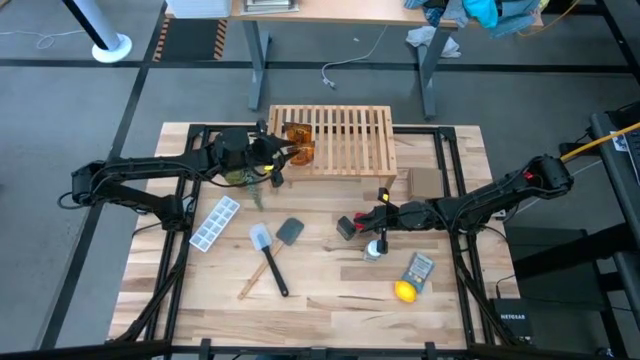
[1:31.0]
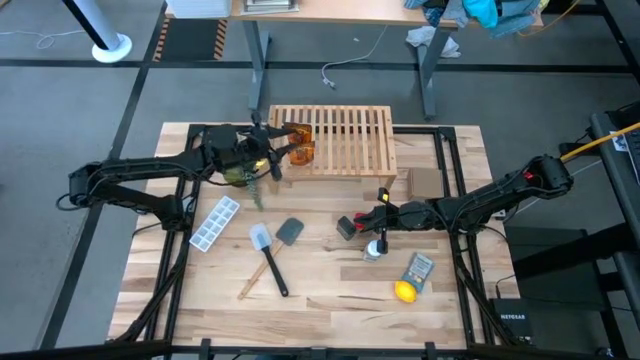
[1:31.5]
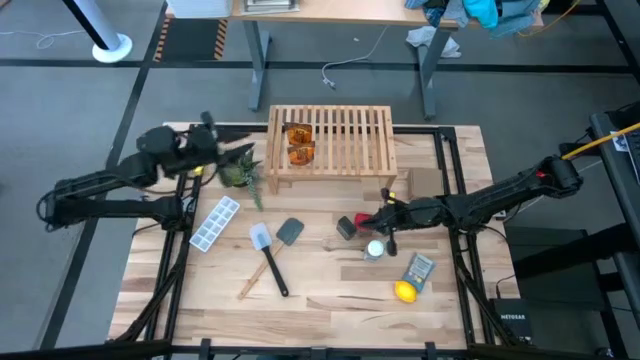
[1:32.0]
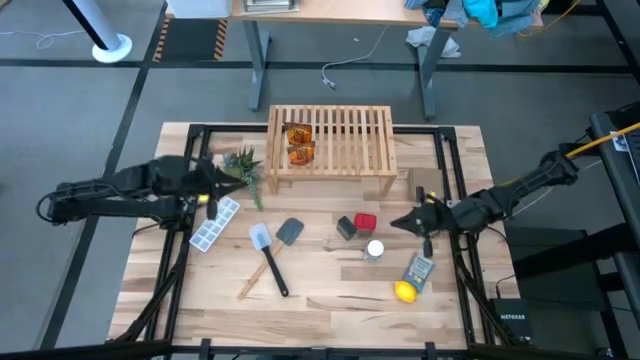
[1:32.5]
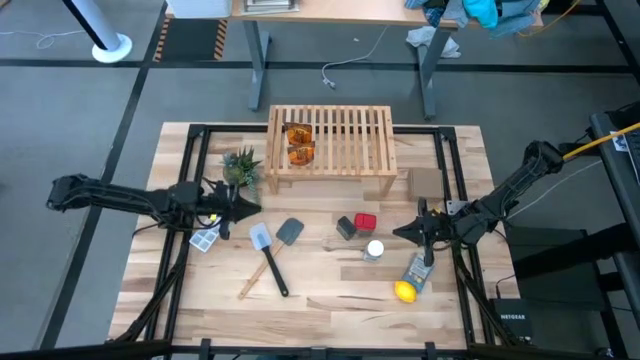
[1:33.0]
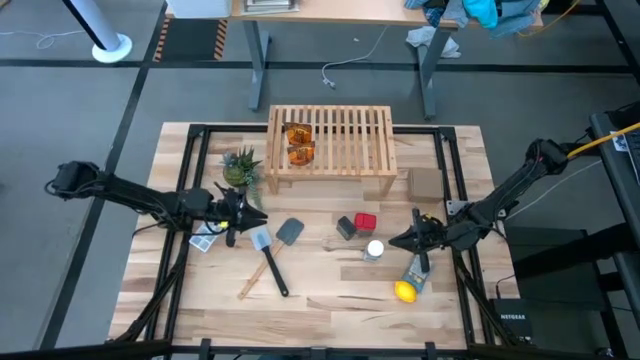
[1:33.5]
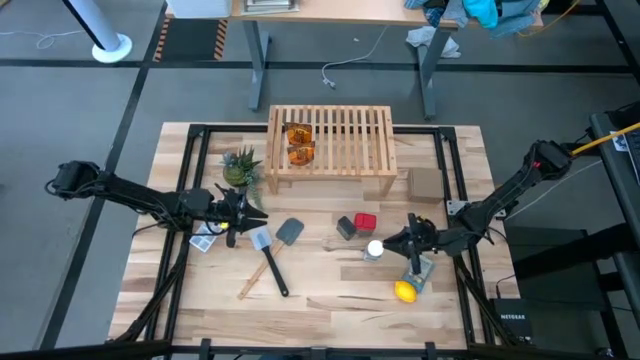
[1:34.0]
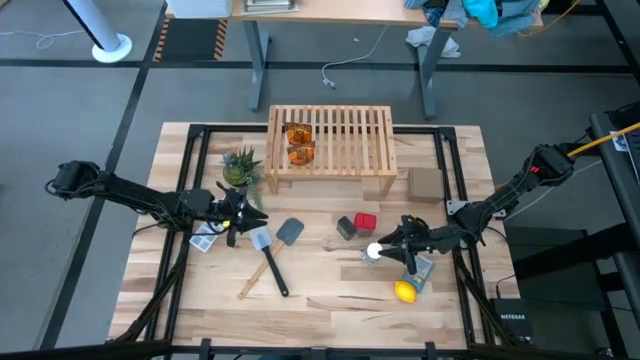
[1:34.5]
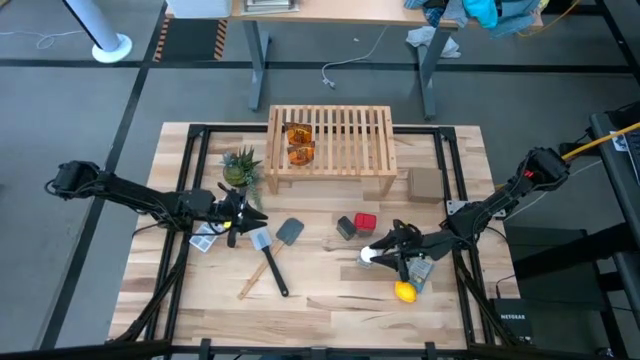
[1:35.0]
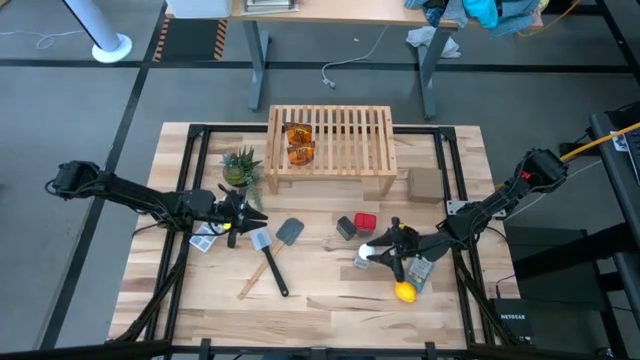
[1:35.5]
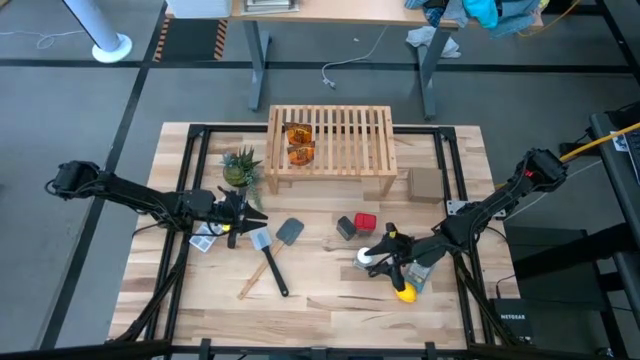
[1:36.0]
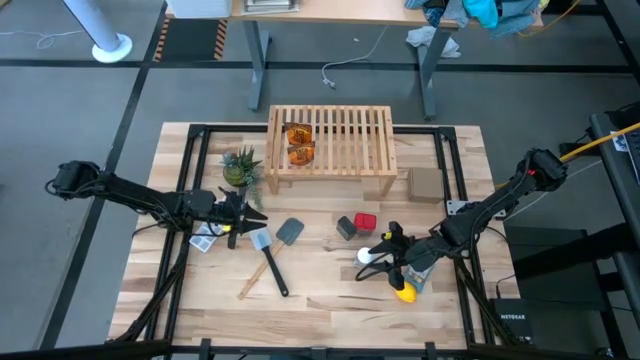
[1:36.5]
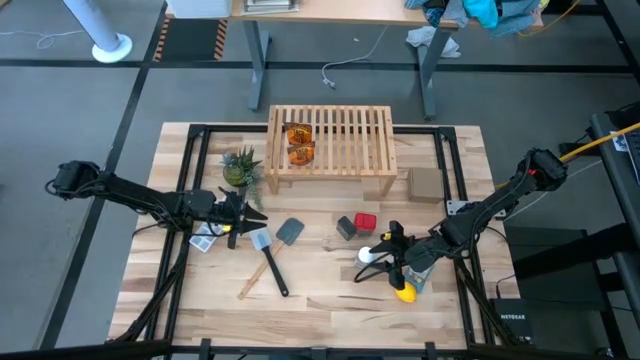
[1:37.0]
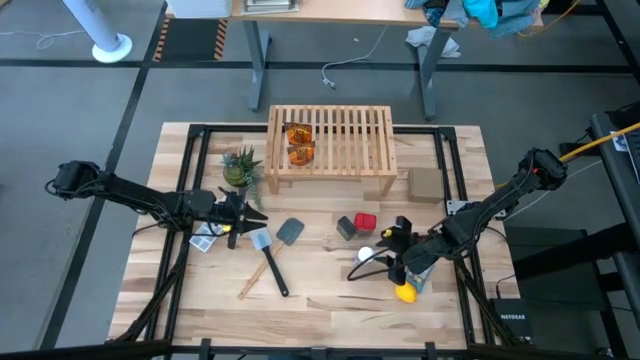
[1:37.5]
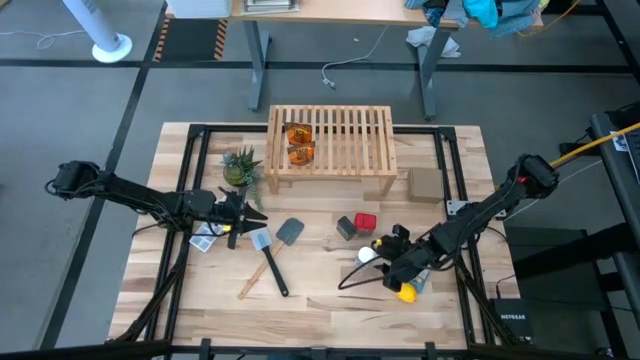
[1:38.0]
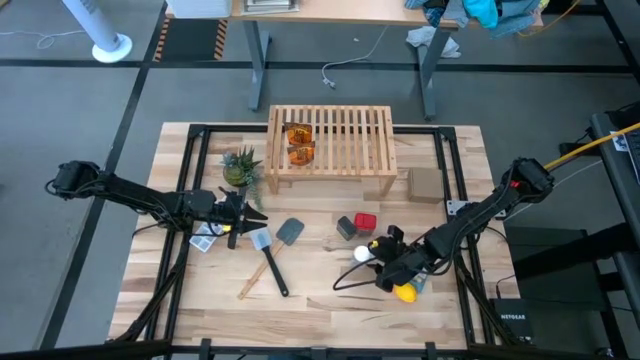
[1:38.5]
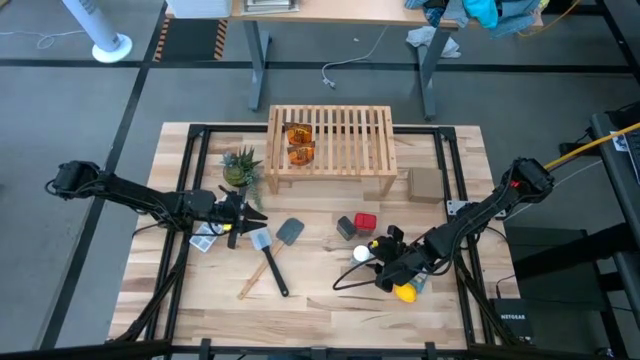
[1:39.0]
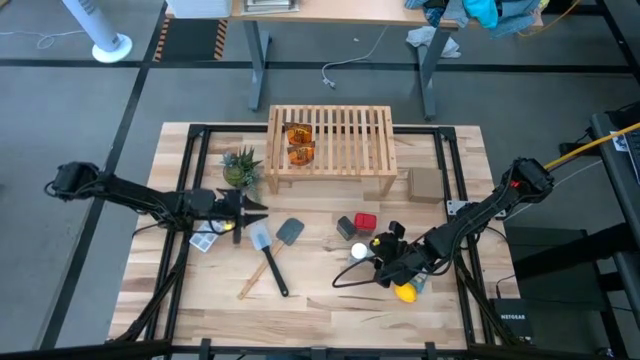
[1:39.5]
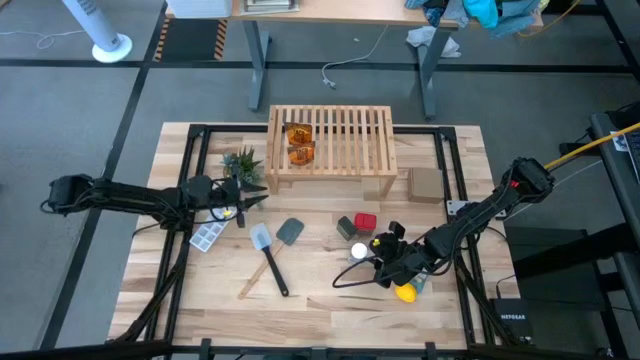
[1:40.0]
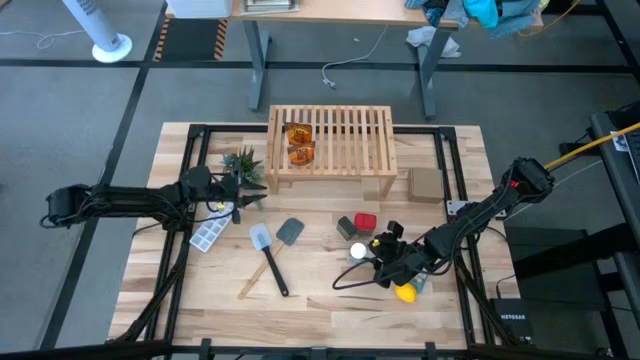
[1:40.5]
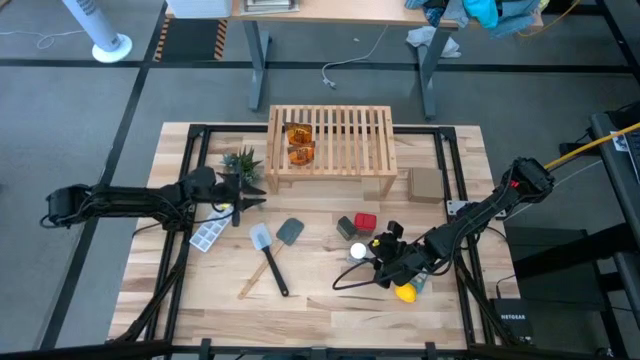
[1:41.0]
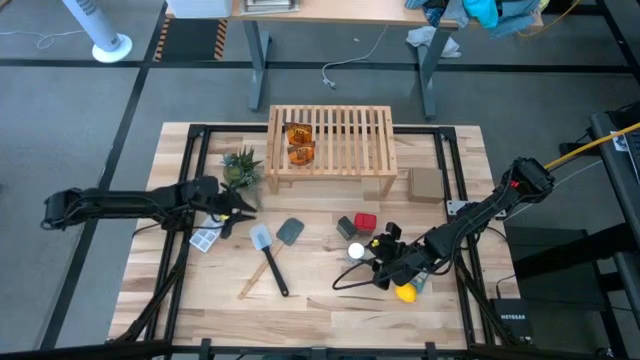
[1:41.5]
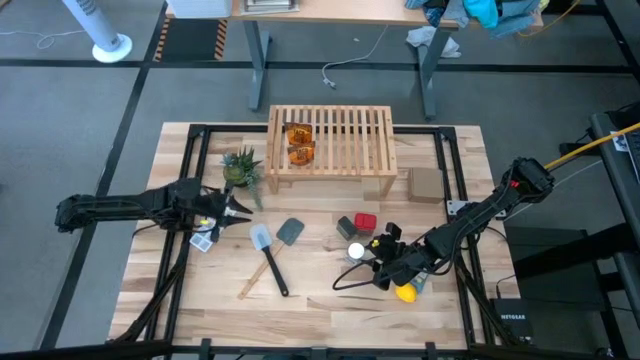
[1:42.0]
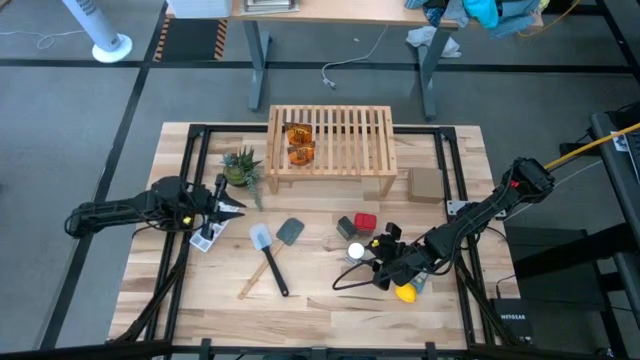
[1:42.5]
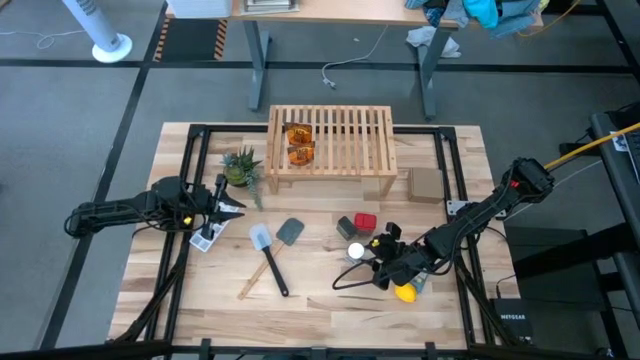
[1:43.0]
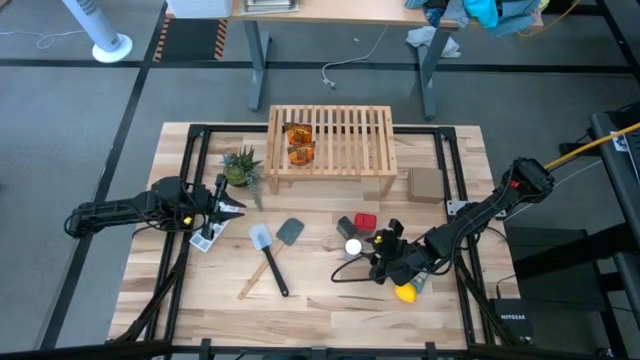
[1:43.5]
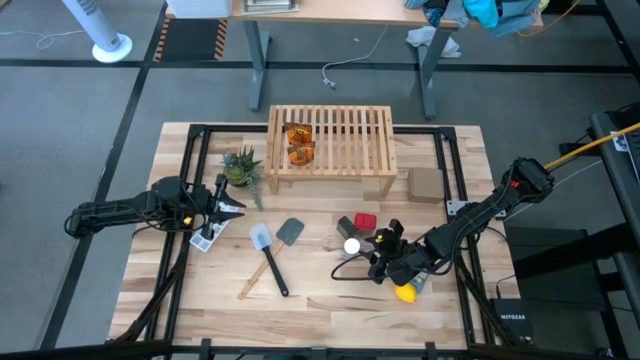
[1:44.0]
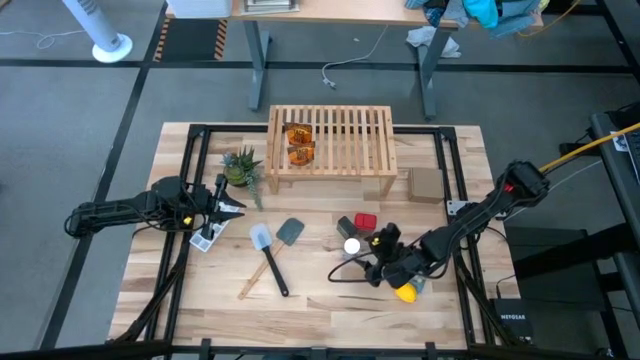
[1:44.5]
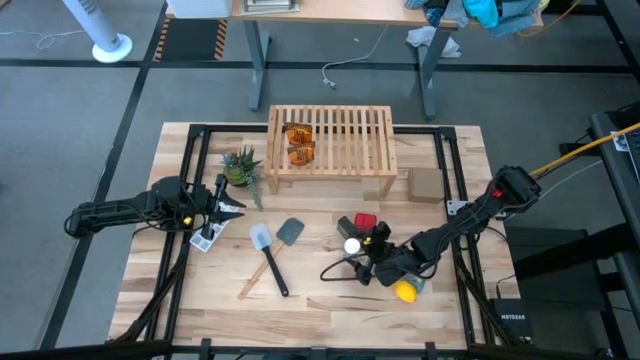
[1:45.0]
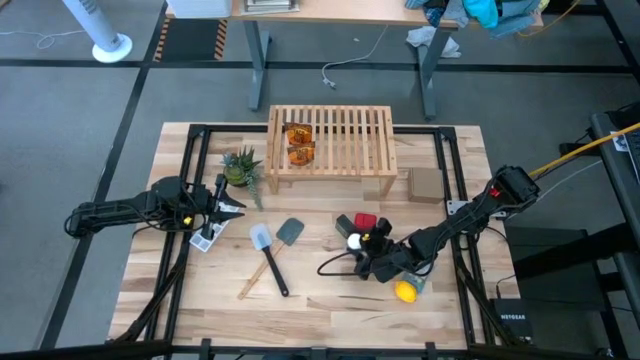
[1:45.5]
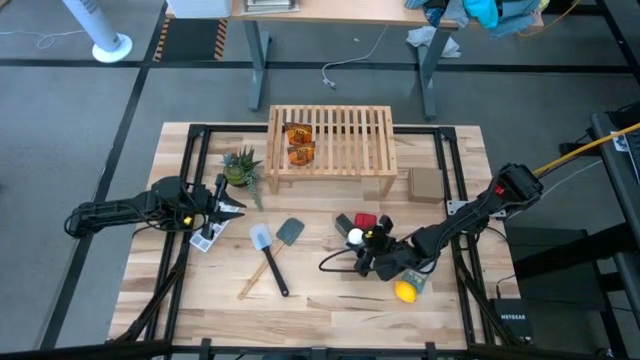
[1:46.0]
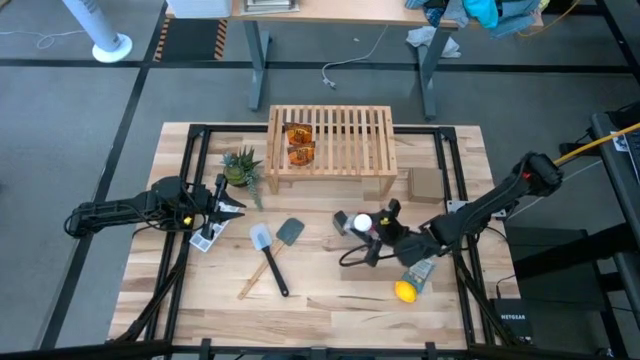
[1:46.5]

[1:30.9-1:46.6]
Task: Shelf spices
Put the white seasoning bottle on the shelf
